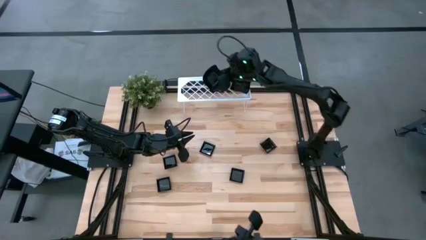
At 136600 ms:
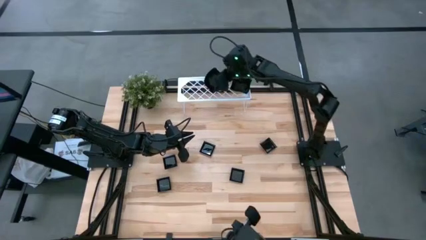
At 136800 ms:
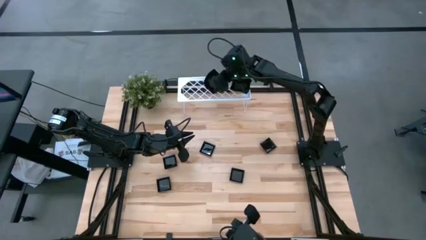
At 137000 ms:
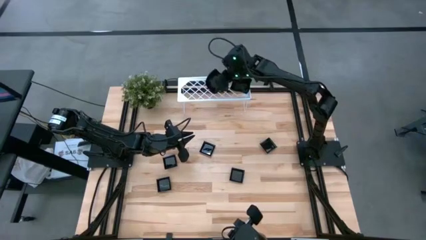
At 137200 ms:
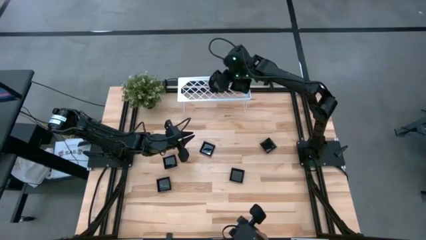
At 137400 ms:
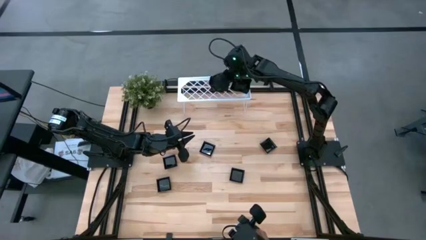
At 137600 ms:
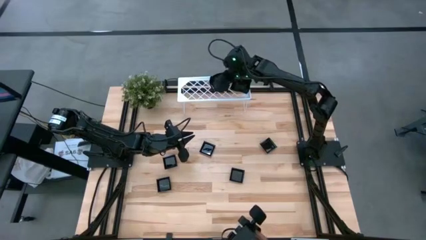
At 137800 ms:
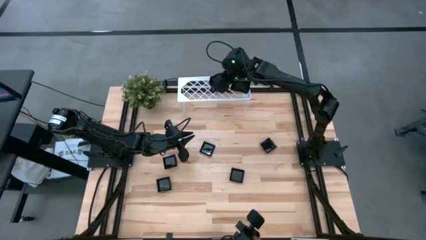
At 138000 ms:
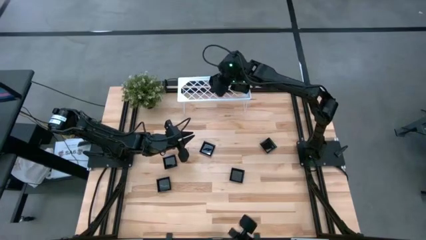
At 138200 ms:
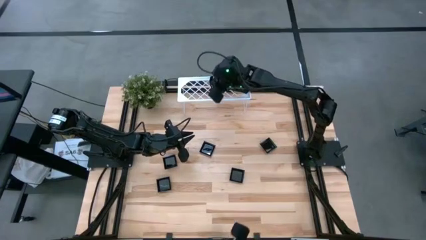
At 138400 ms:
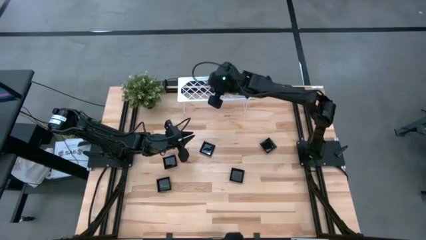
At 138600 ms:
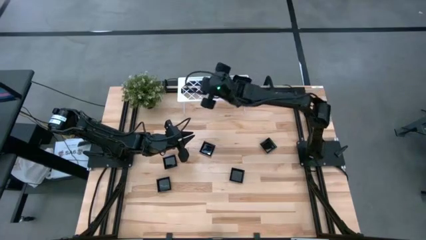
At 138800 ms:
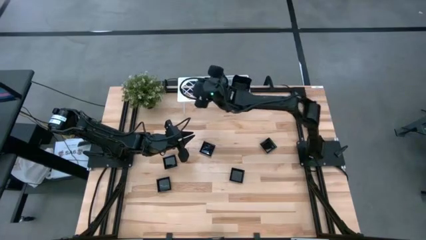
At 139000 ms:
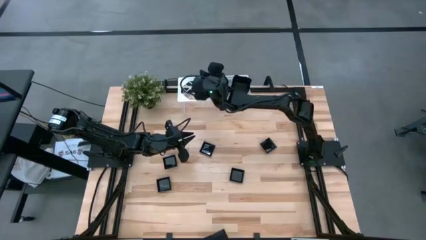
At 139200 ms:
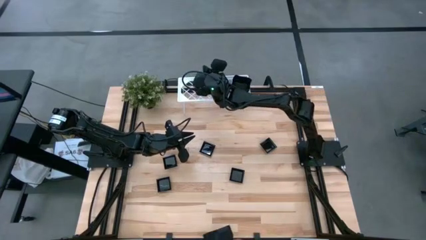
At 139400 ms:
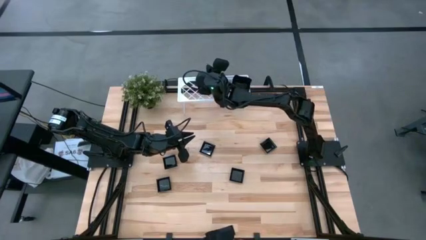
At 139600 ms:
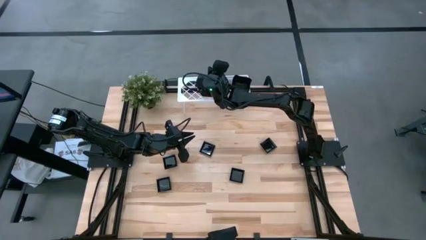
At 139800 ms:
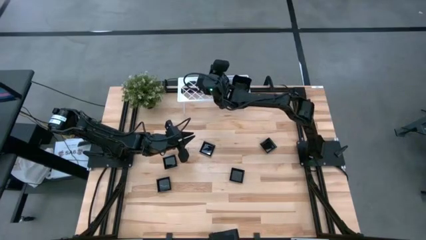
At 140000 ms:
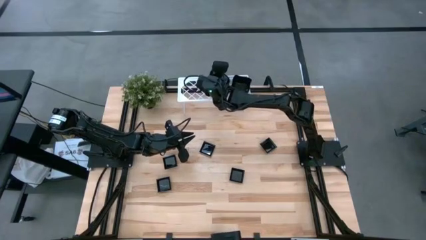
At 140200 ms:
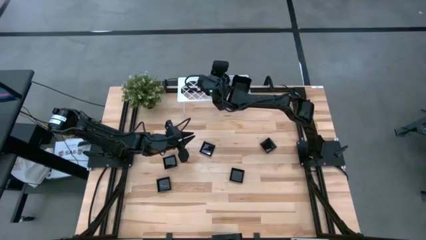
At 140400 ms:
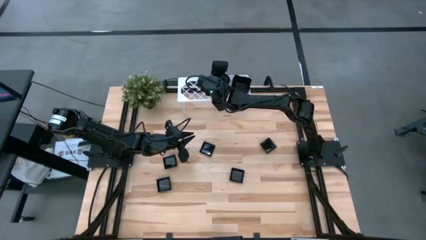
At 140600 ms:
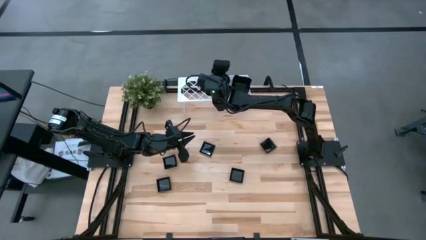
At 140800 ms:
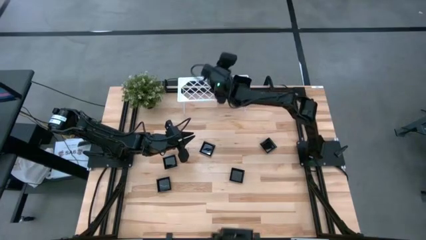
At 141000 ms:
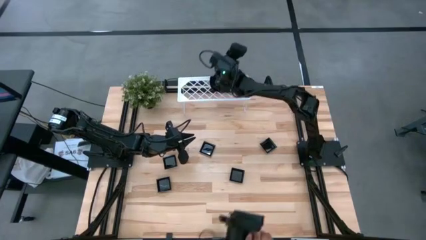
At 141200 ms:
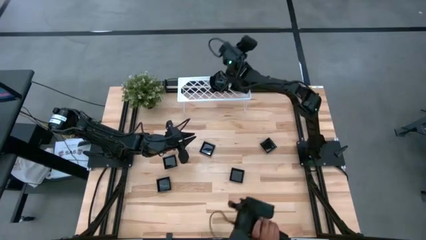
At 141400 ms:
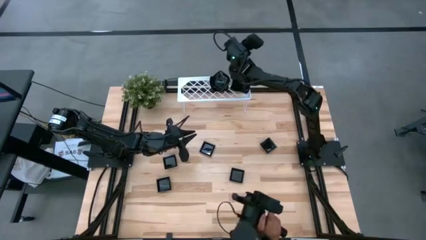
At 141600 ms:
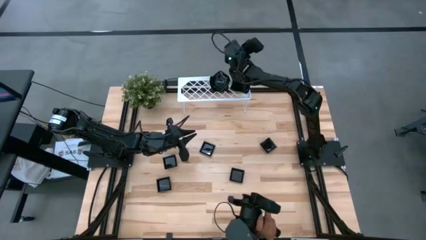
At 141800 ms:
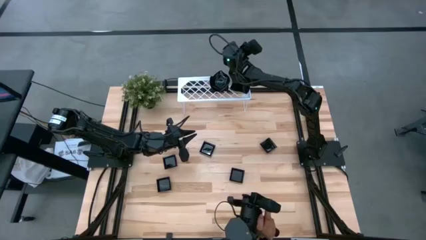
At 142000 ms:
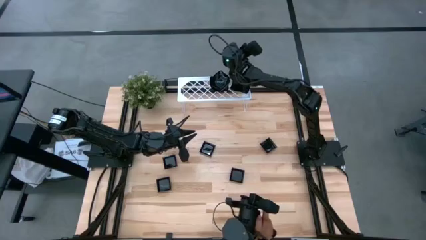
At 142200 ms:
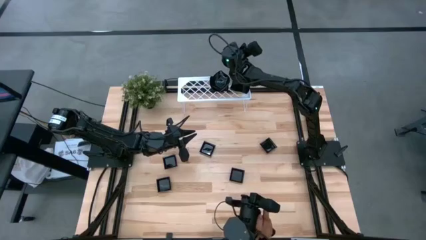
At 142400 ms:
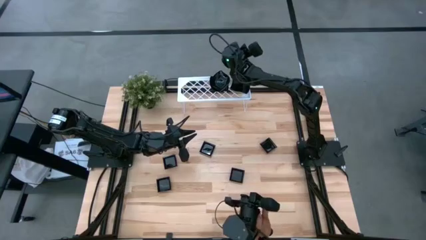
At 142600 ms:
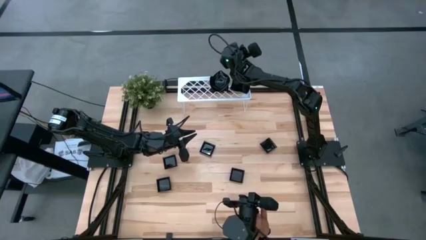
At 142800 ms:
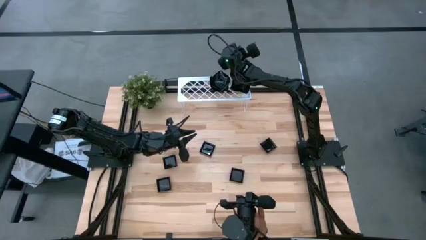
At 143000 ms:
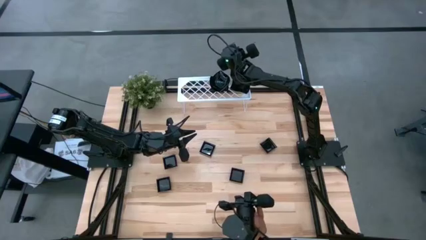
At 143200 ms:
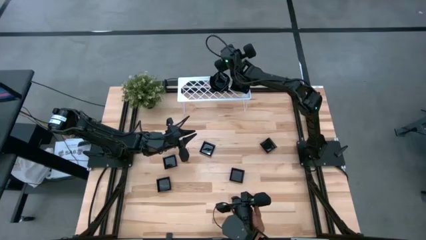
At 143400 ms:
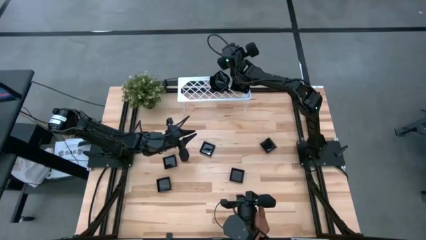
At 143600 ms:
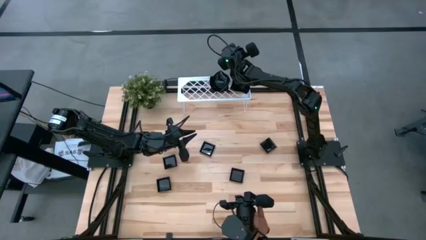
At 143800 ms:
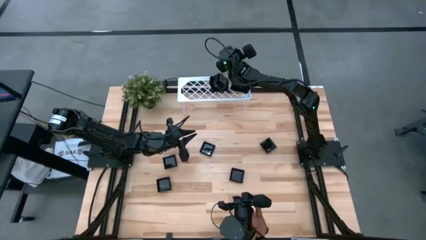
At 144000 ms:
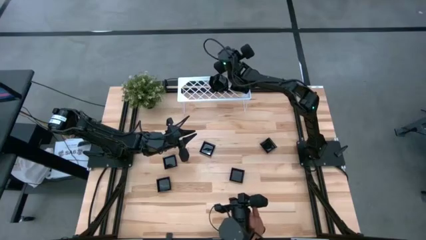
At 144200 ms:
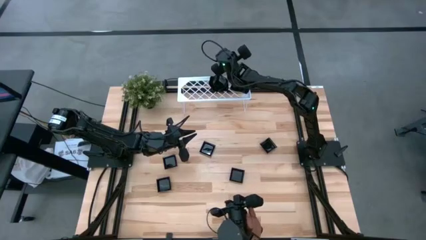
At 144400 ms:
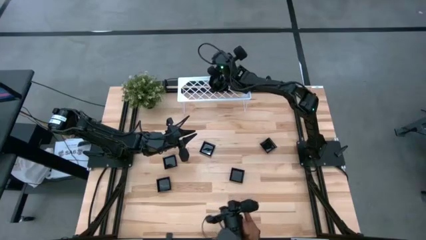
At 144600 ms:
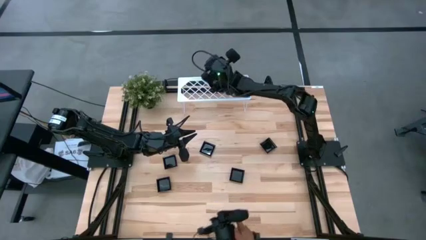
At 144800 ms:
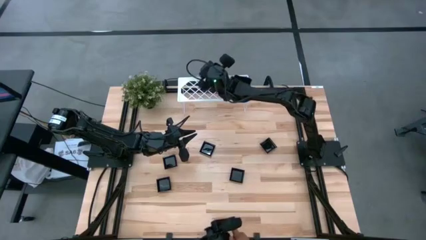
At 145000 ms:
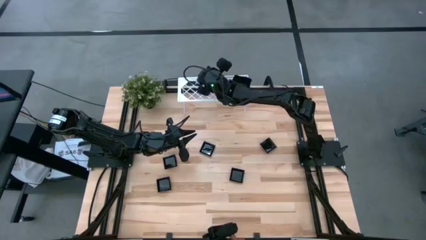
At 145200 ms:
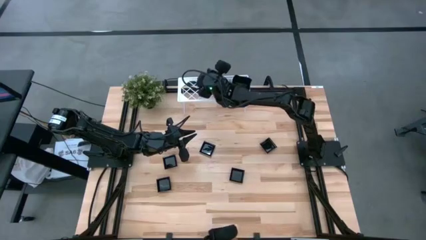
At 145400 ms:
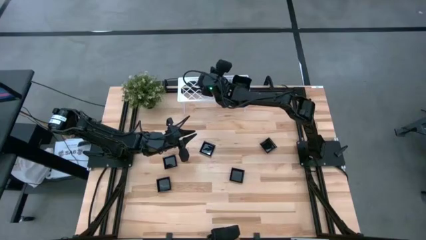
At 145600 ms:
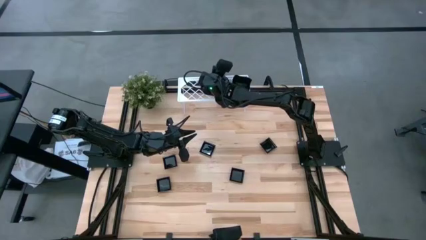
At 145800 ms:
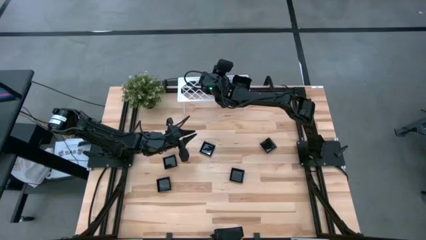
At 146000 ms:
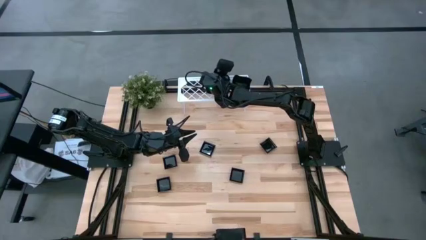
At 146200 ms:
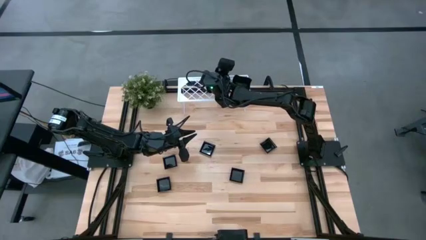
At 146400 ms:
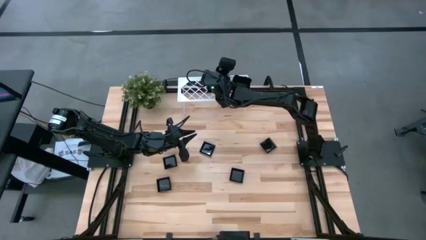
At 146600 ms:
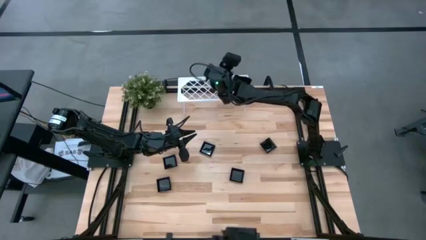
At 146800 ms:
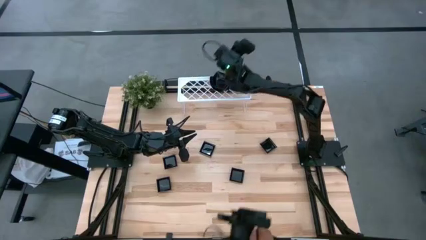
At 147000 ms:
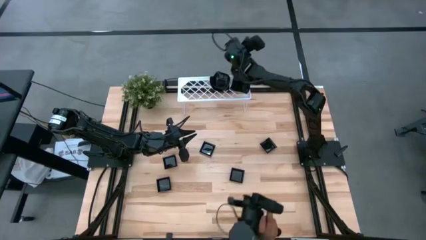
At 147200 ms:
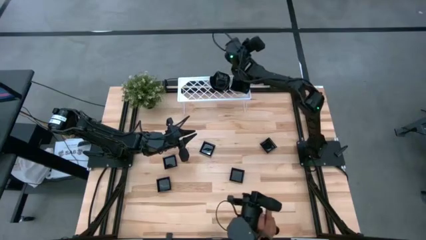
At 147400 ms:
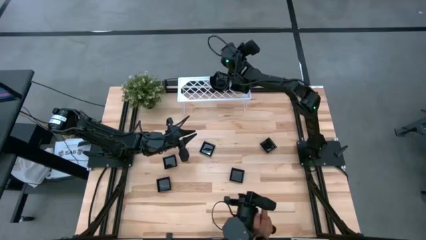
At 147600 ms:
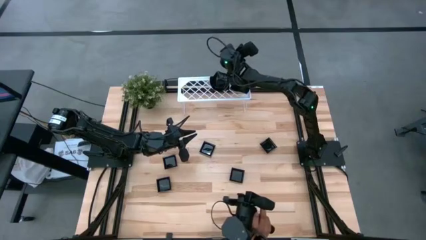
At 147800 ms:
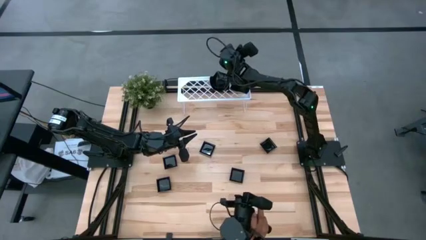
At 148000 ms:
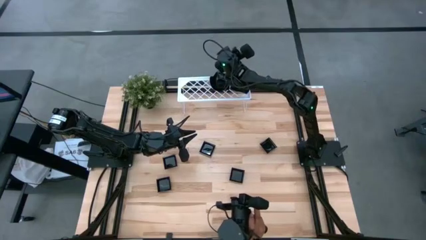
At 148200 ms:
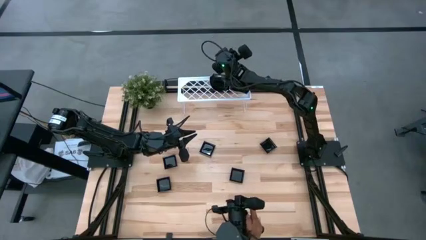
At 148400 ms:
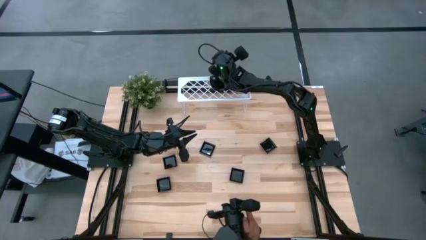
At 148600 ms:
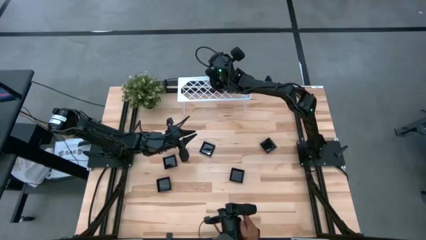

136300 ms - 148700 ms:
Task: Pick & Place Mini shaped plates
Stack the black leaf-shaped plate on top of the black leaf-shaped plate on the shelf

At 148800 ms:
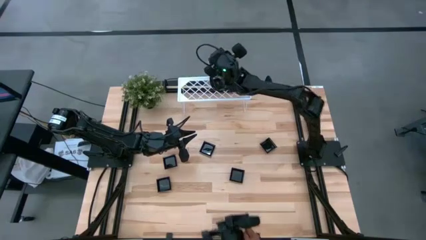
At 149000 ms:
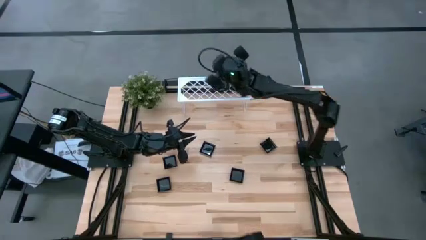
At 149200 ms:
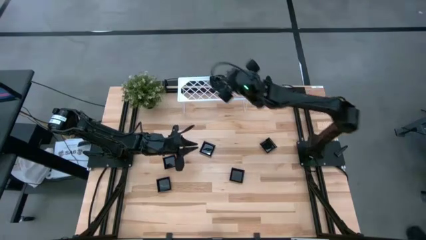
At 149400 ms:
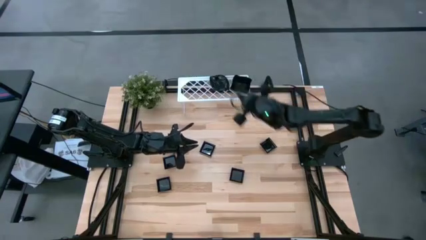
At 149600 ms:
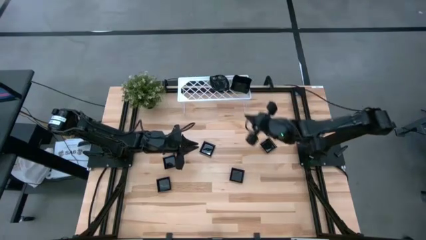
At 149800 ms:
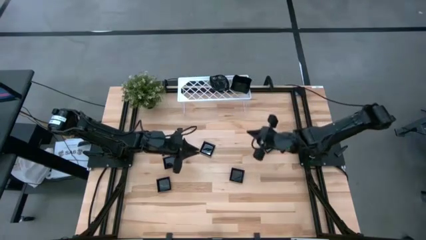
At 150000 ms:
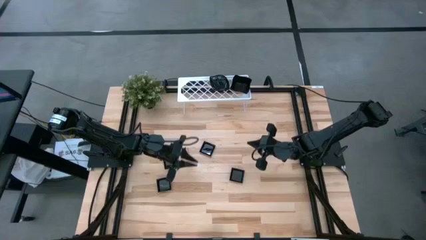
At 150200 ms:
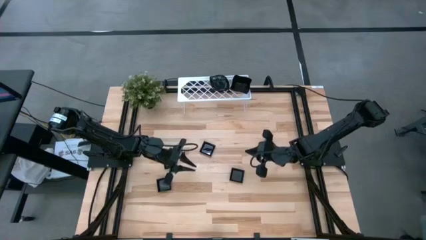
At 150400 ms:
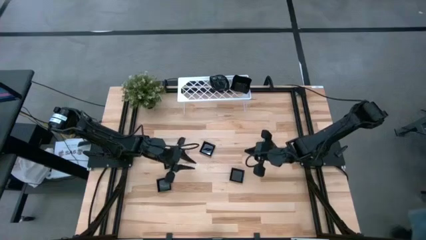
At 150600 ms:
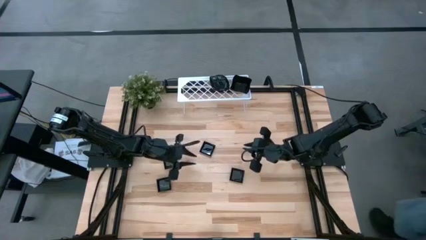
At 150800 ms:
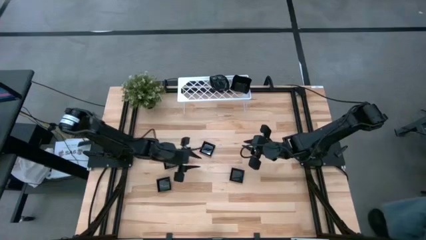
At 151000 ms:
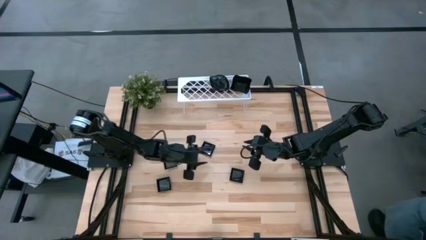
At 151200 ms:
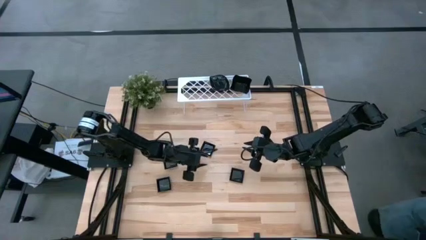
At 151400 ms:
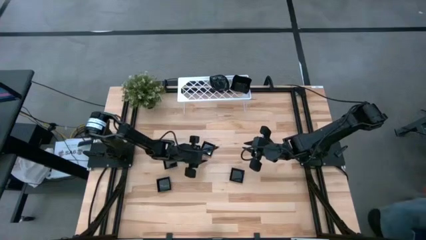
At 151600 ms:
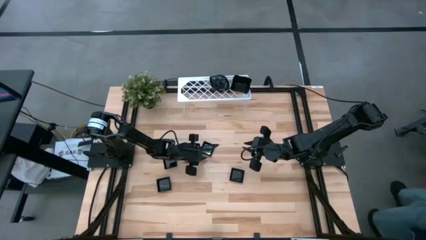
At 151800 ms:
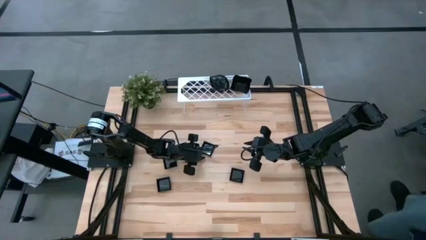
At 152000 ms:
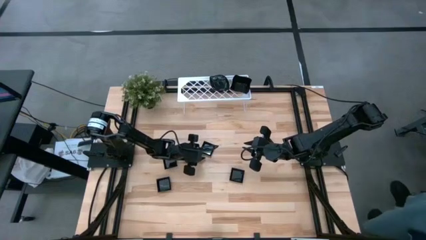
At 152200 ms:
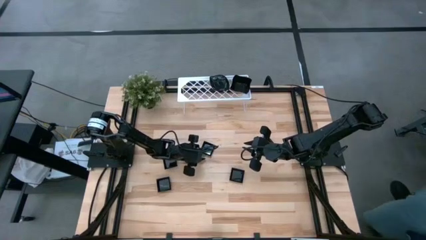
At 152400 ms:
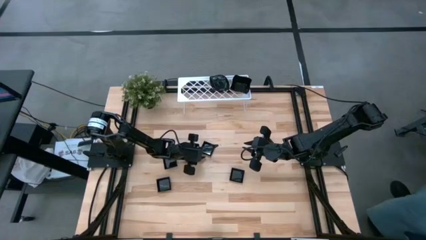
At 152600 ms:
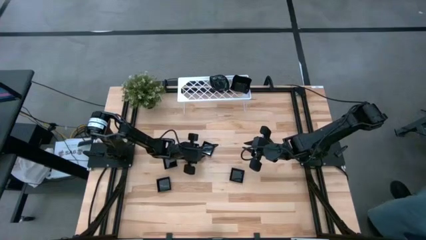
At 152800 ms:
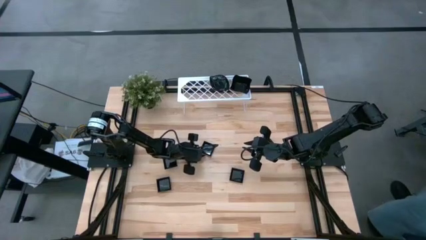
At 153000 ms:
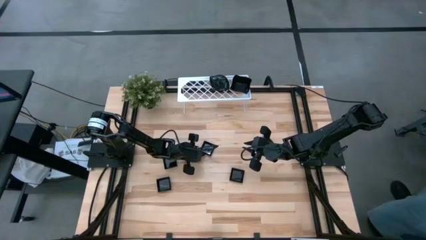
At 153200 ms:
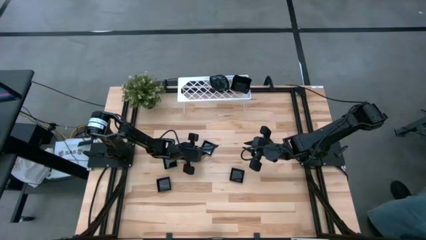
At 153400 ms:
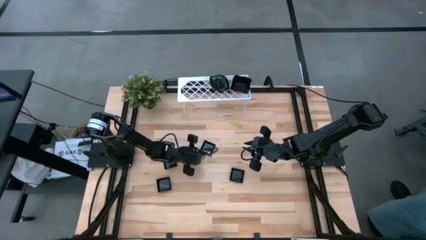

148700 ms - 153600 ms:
Put the black square plate on the shelf
